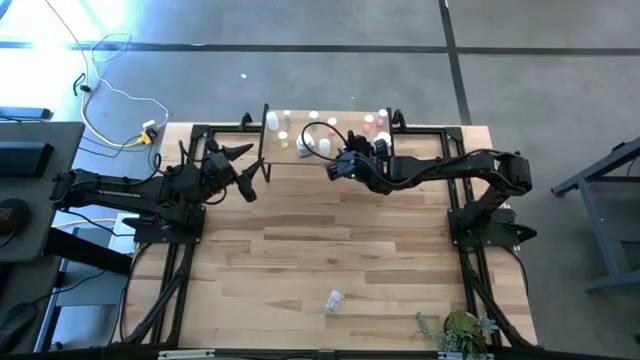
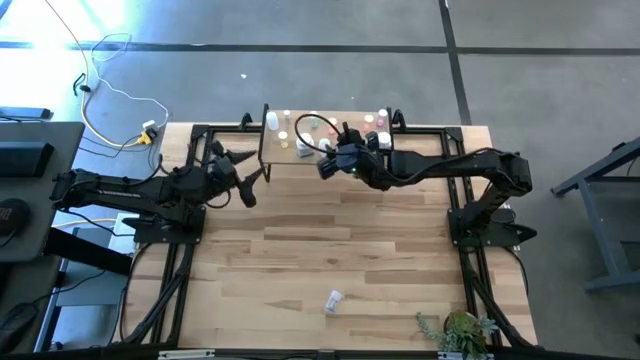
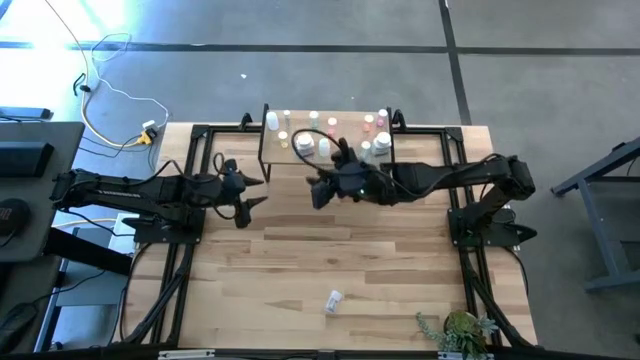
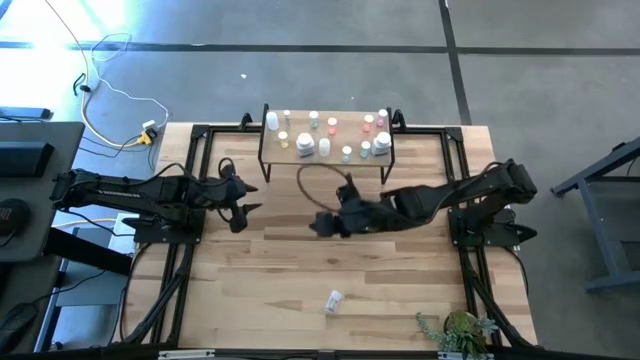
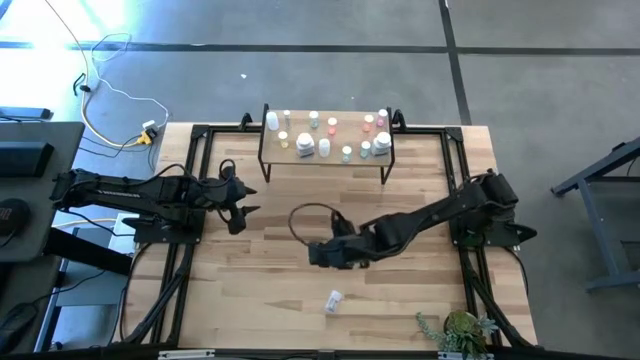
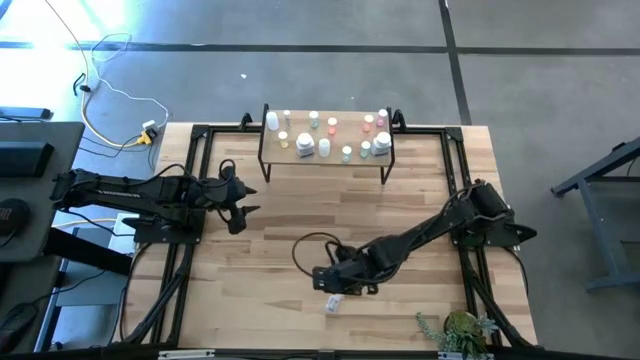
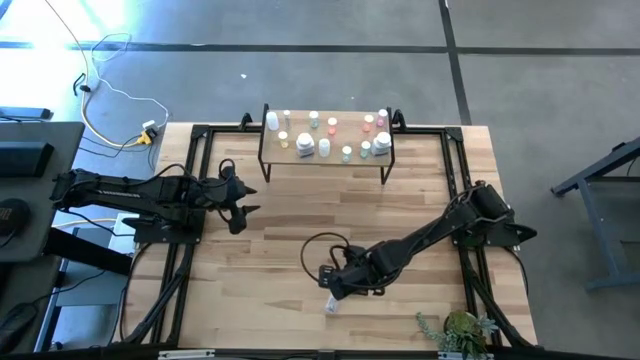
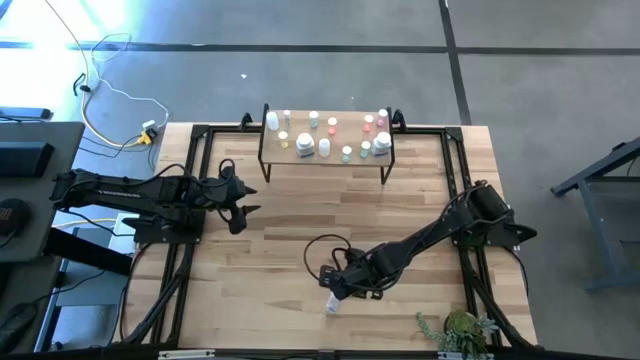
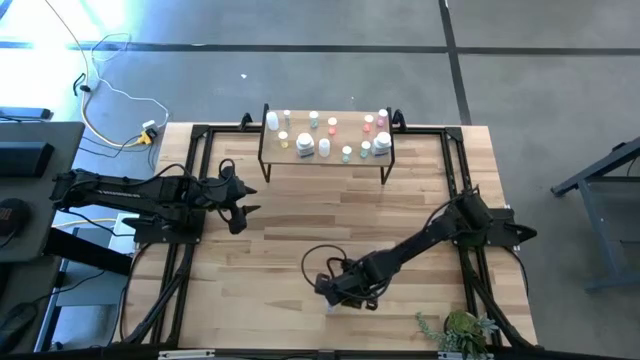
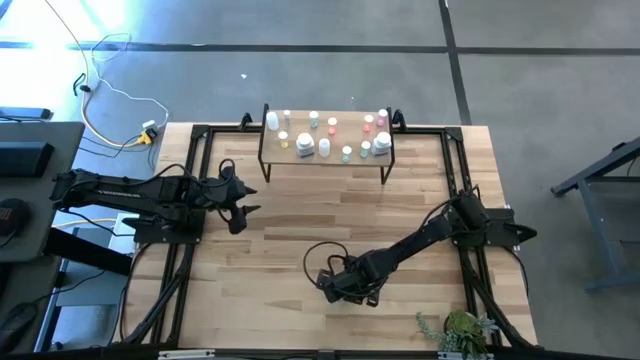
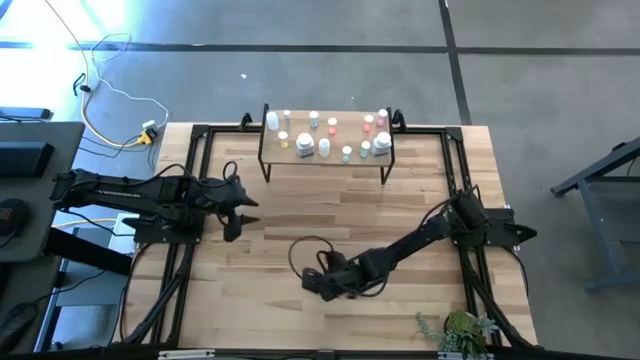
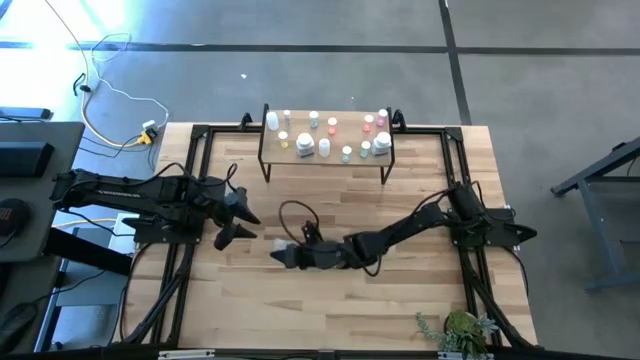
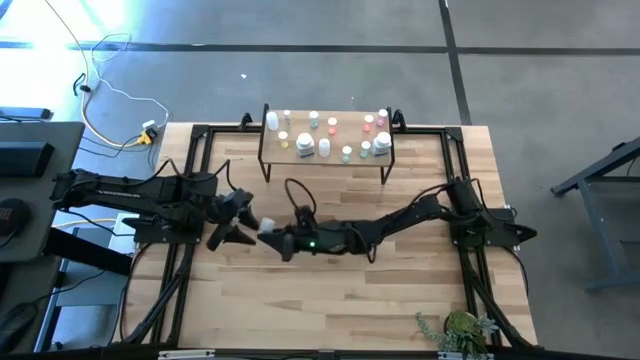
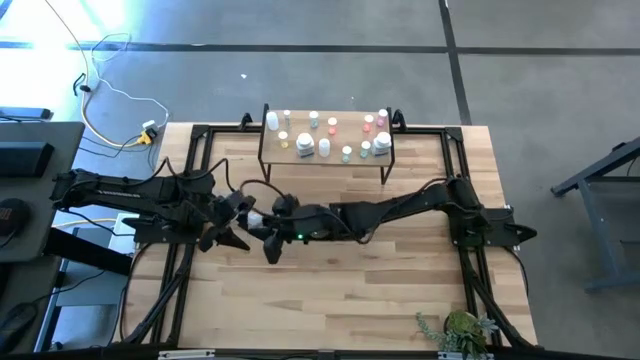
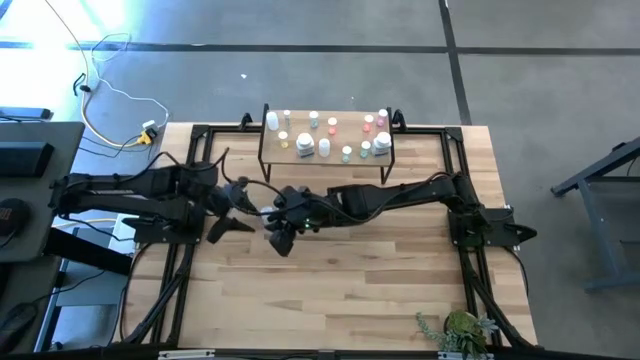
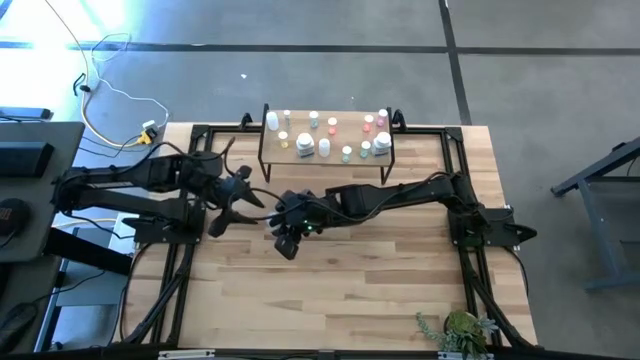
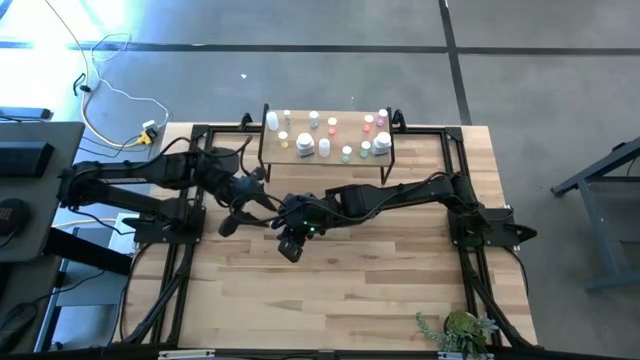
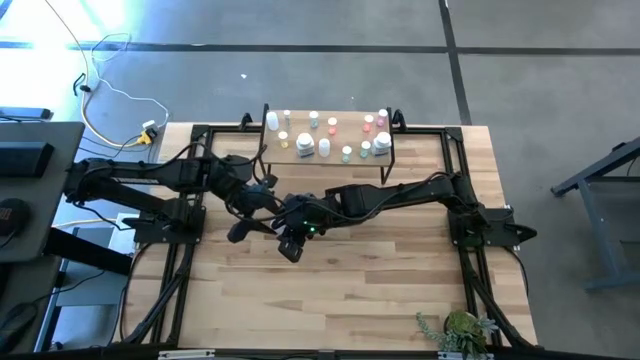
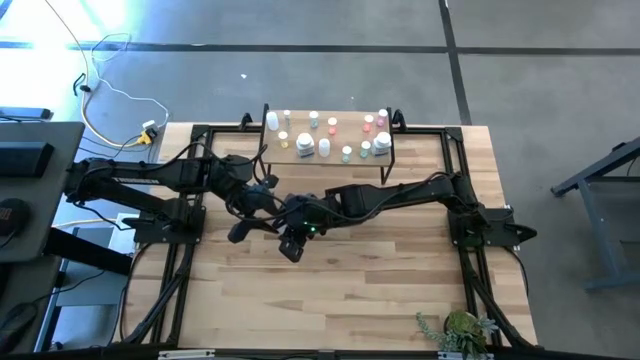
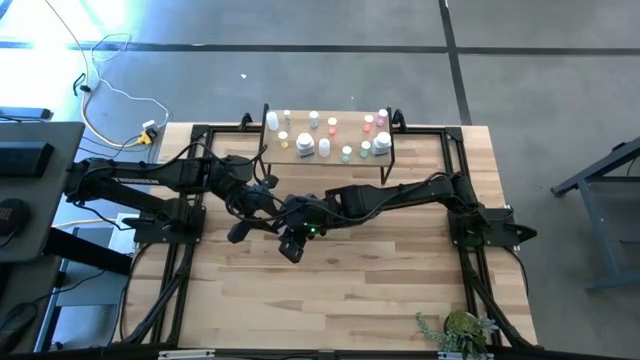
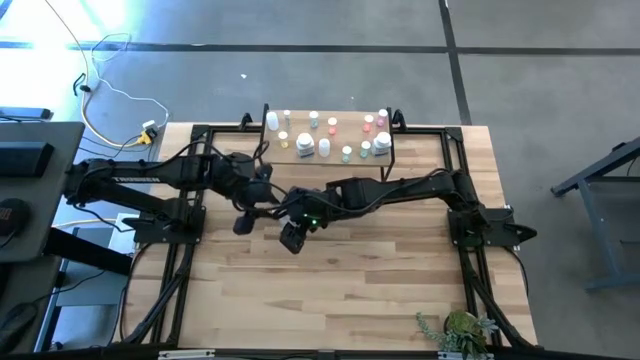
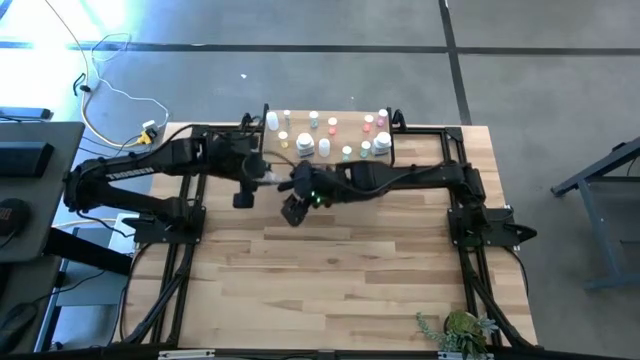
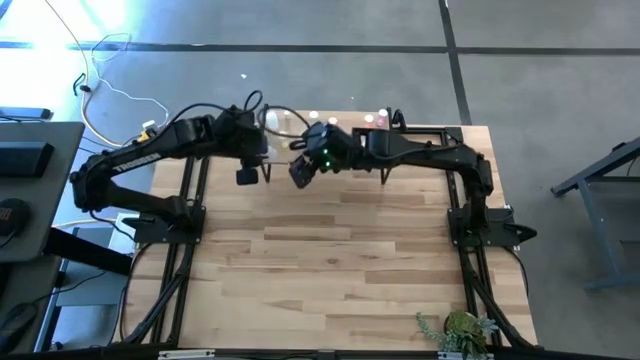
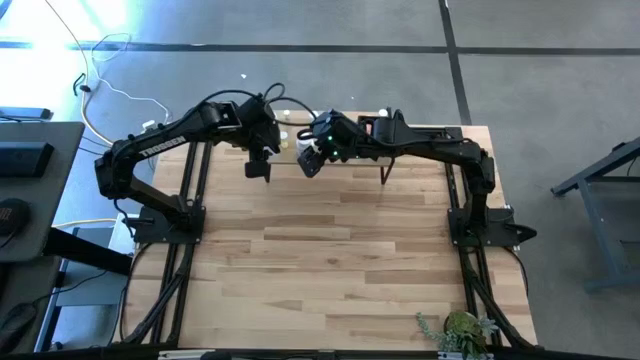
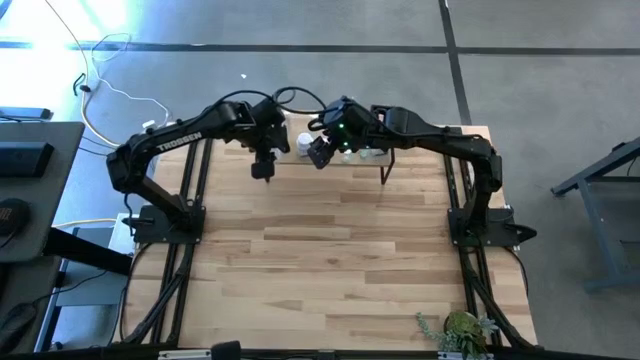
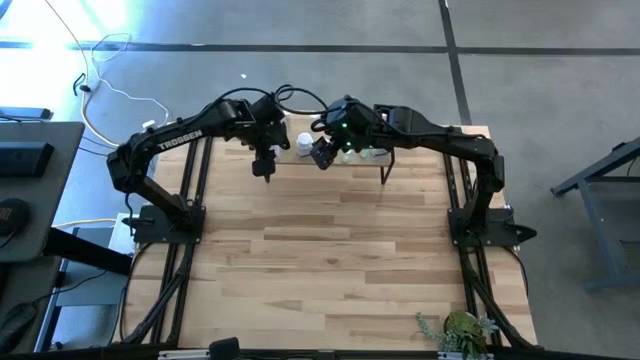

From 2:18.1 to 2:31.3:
Task: Pick and place medicine bottles onto shelf by color
Put the transparent pill bottle on the shelf

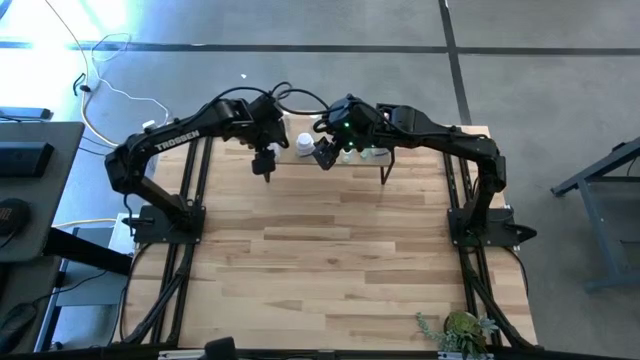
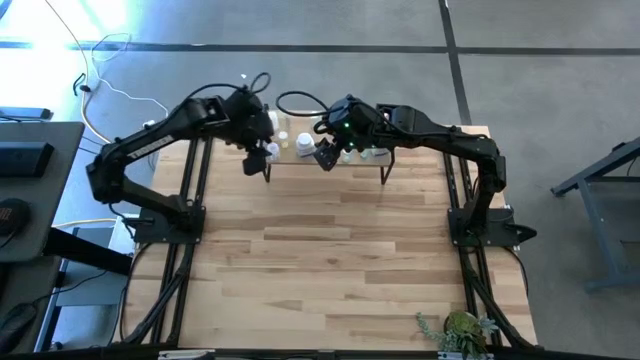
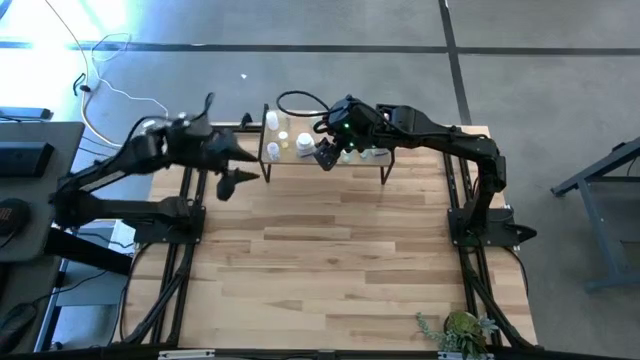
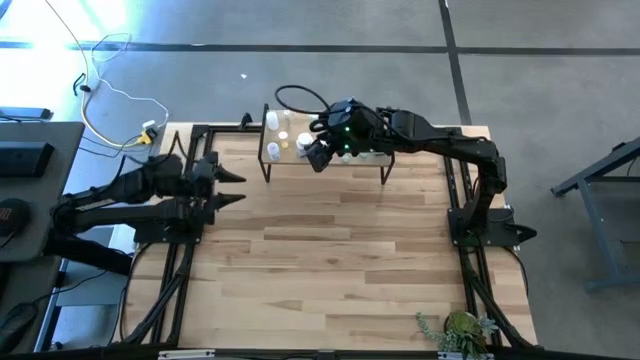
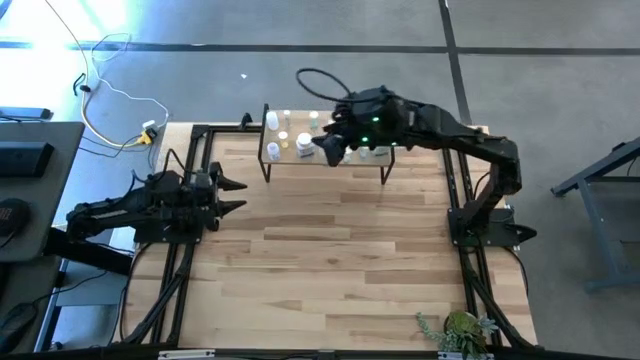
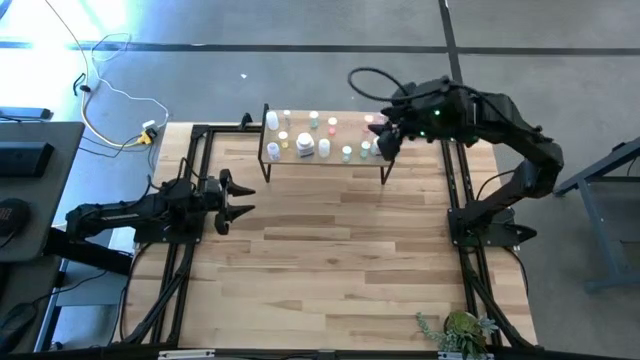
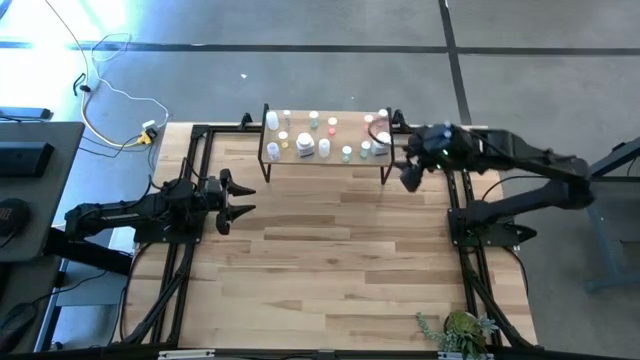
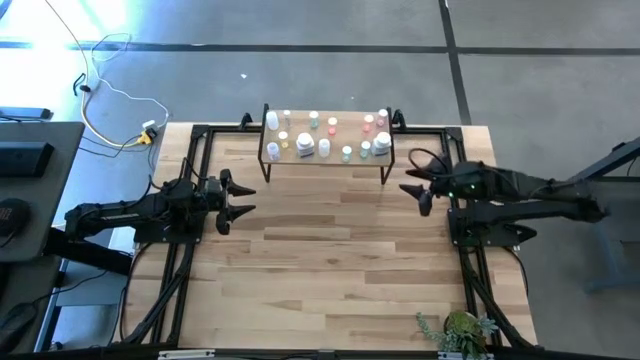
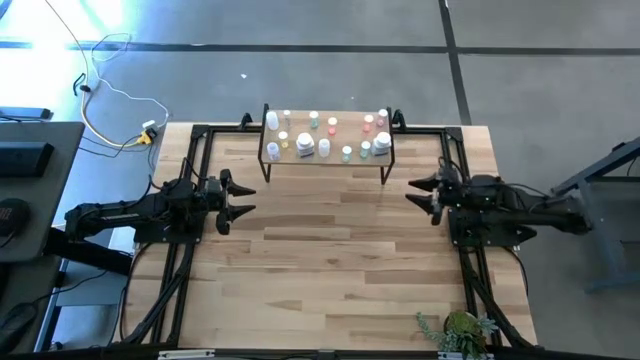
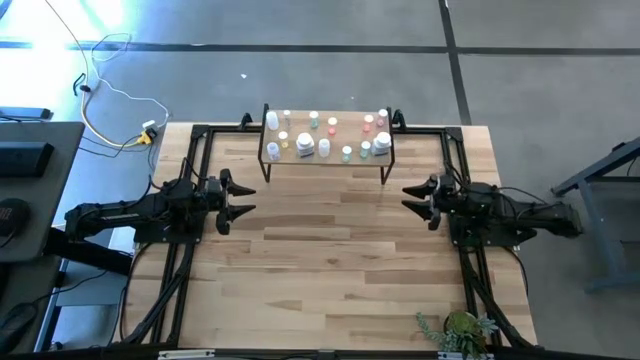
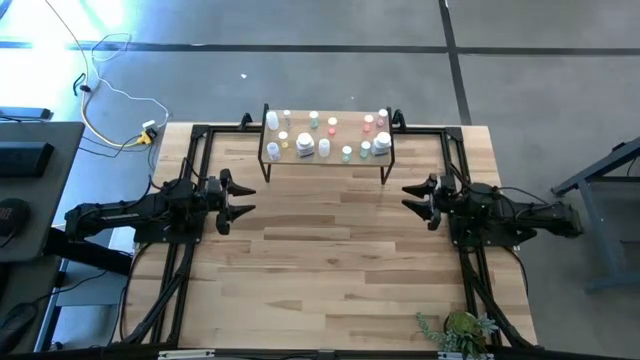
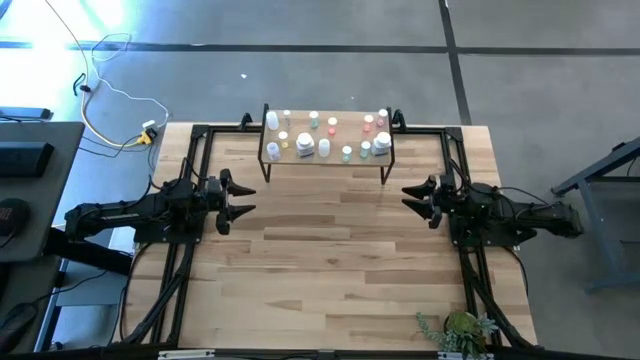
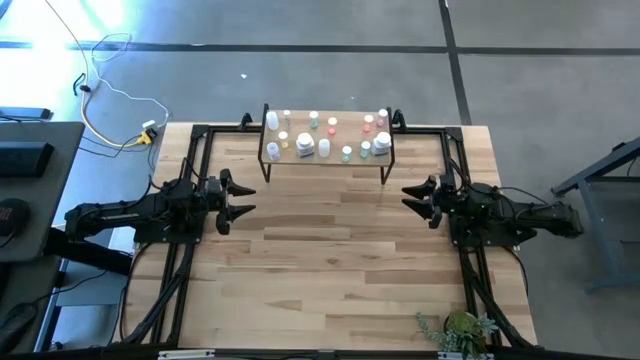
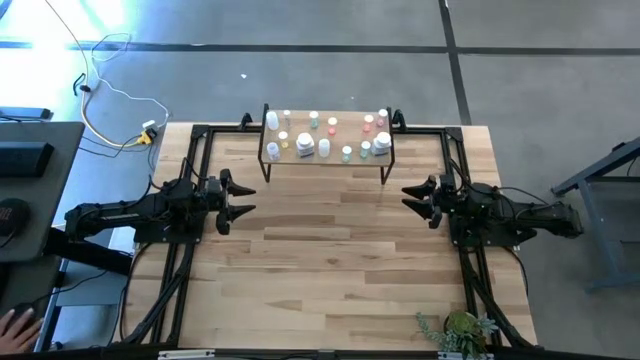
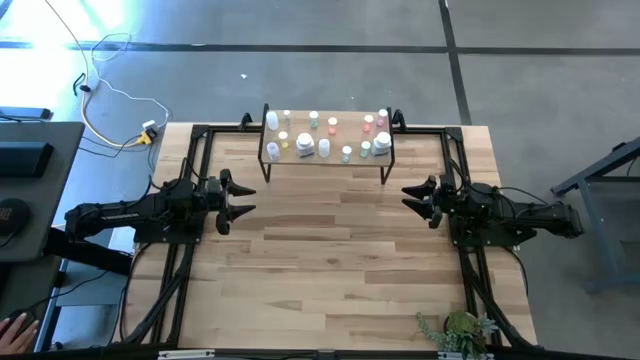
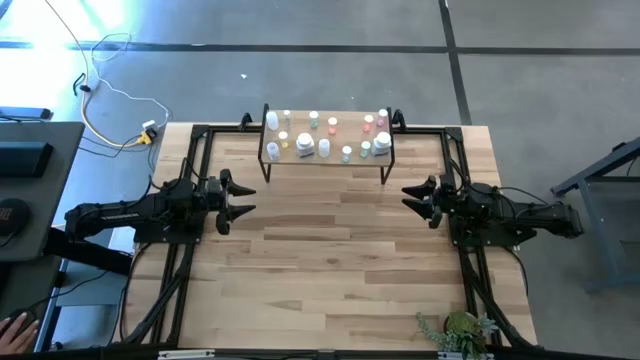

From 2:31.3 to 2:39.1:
Return to Home Position

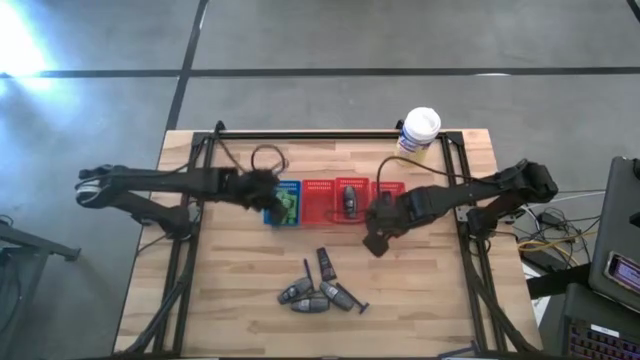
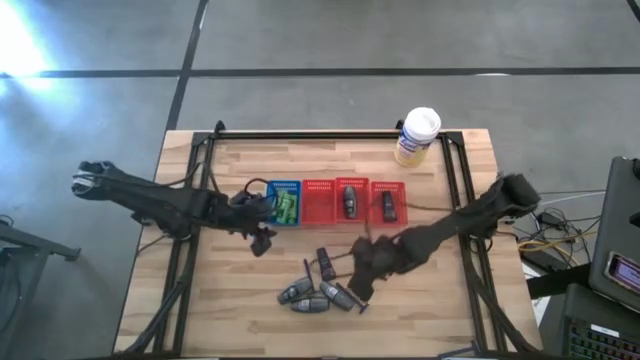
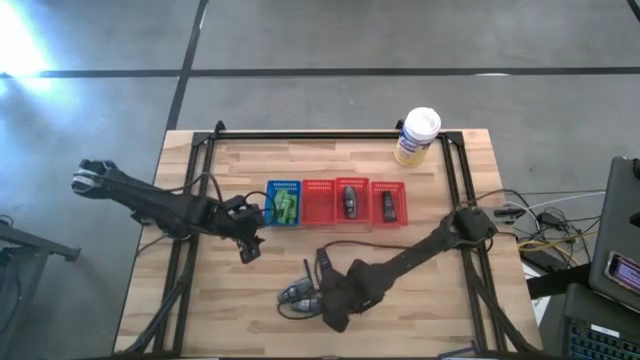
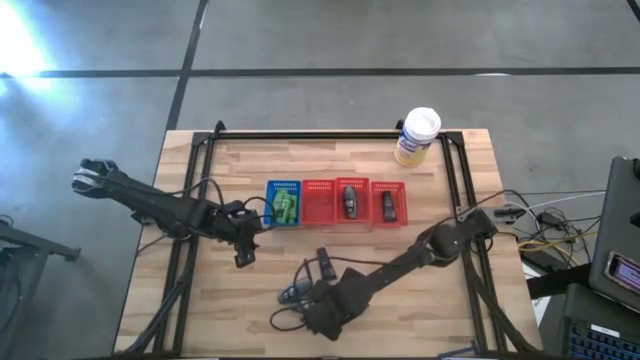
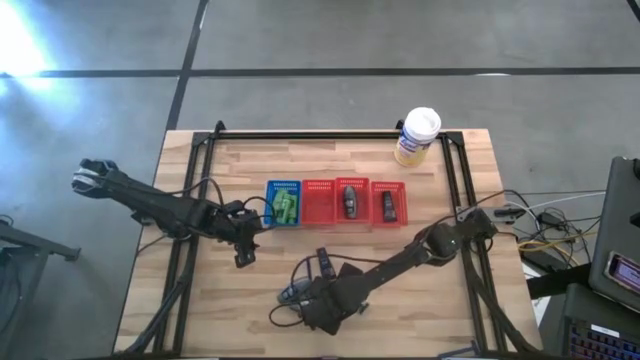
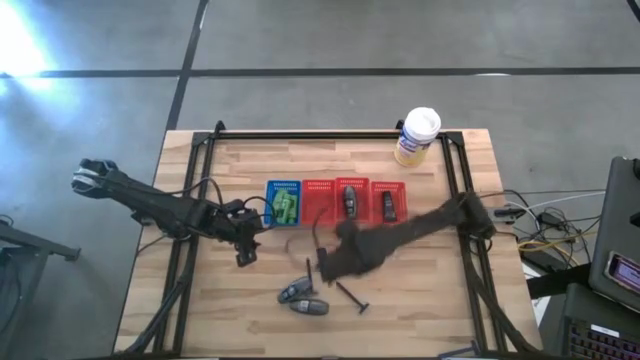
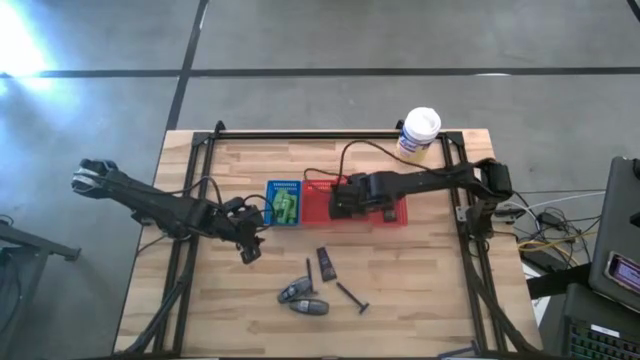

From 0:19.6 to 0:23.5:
Task: Pick & Place Travel size toiletries
Put the gray deodorant into the middle red bin
